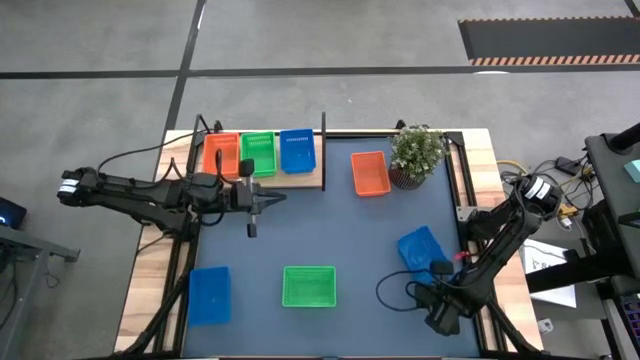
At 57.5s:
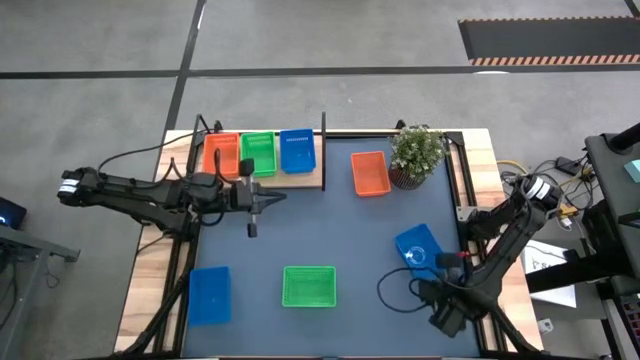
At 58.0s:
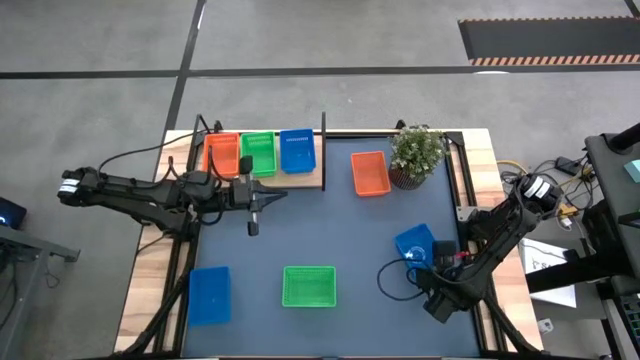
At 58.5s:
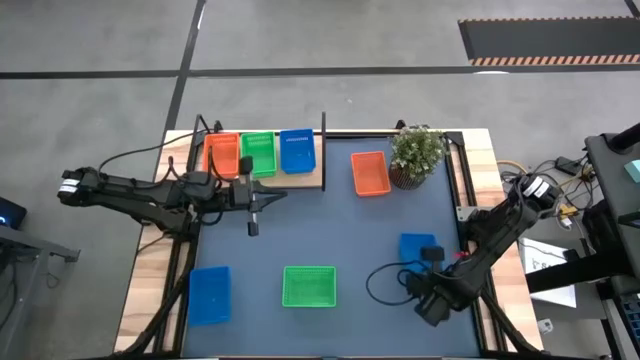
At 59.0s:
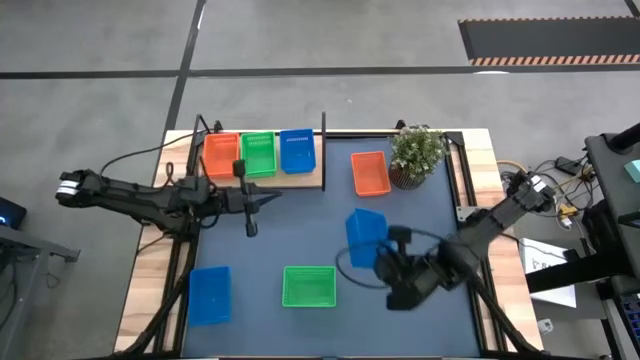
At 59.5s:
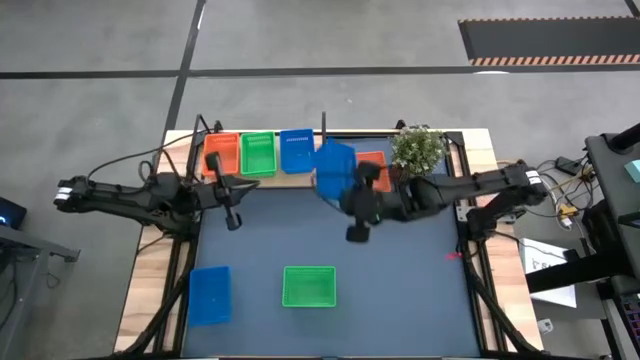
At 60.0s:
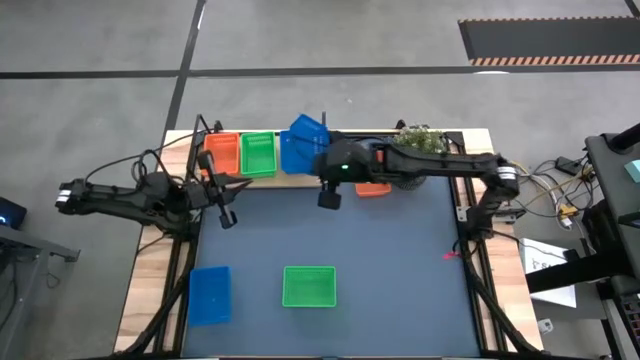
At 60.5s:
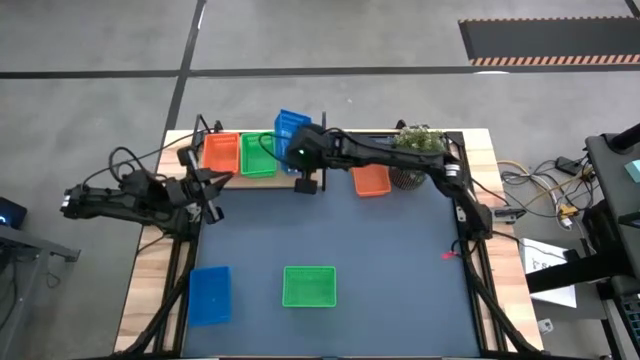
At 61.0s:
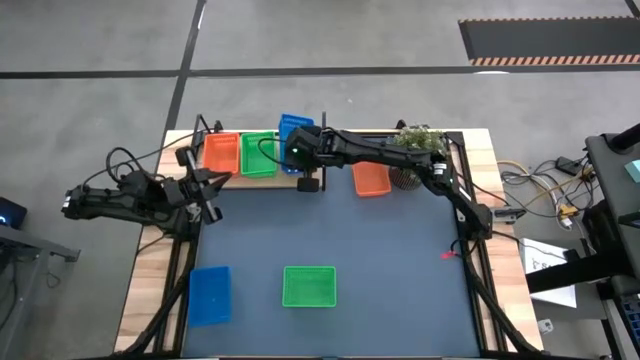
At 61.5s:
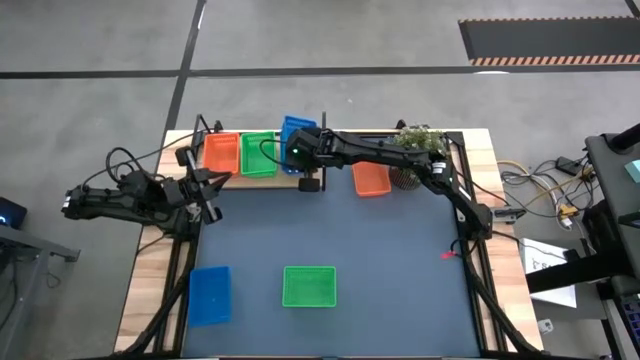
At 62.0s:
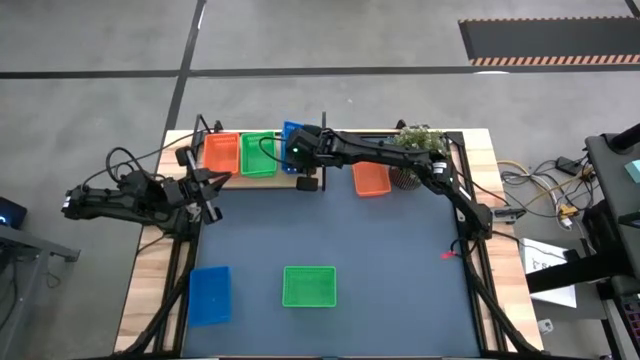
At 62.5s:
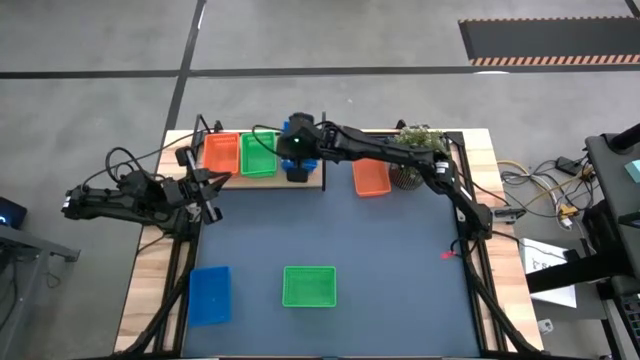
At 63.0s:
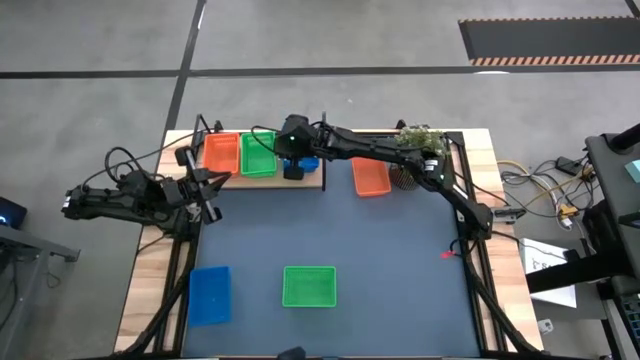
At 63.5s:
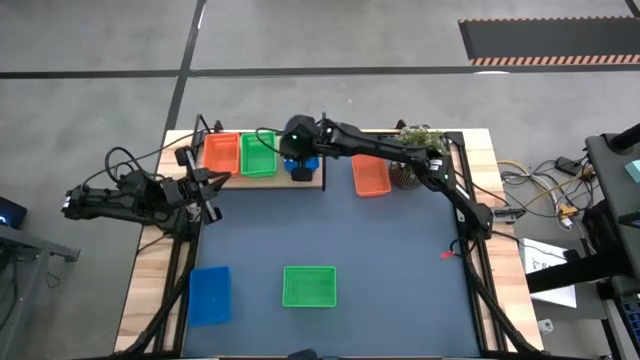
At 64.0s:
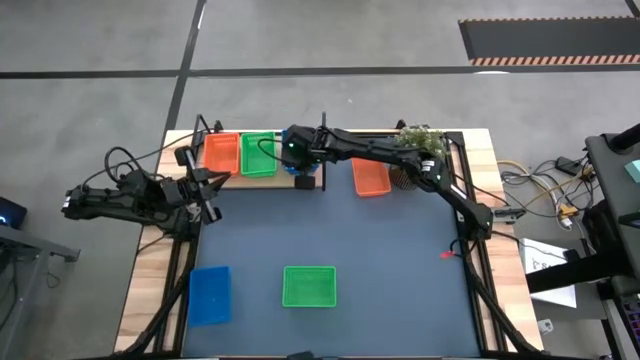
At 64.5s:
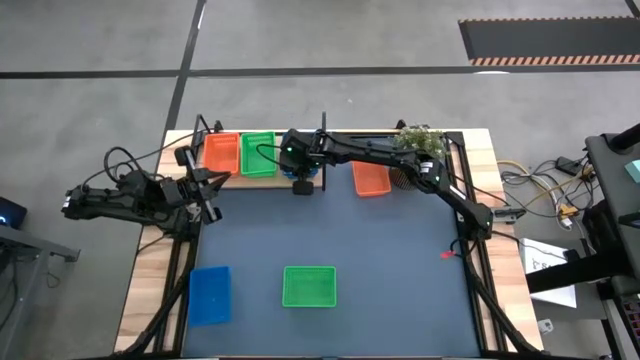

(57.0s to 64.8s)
Task: Stack baskets on shelf by color
Stack the right blue bin into the blue bin on the shelf

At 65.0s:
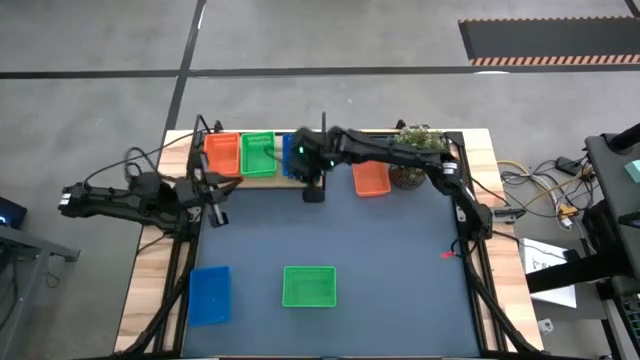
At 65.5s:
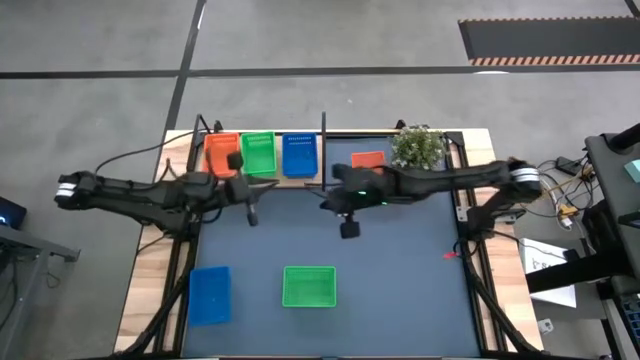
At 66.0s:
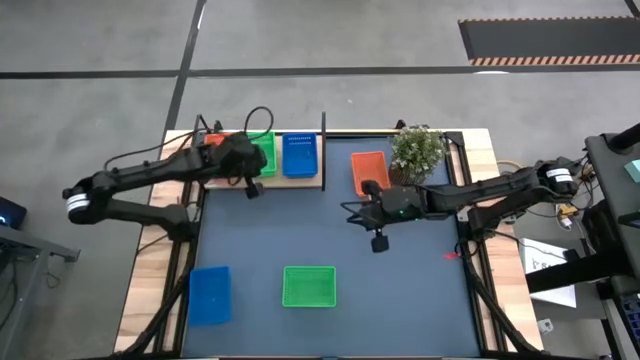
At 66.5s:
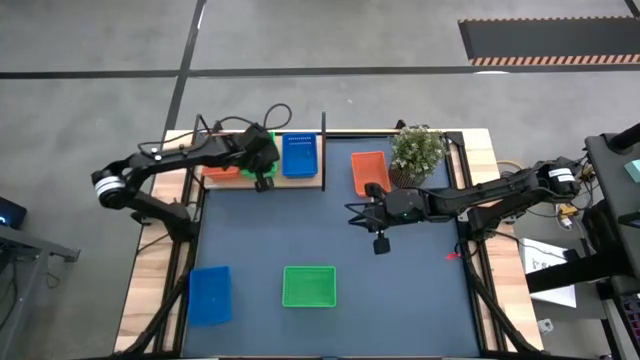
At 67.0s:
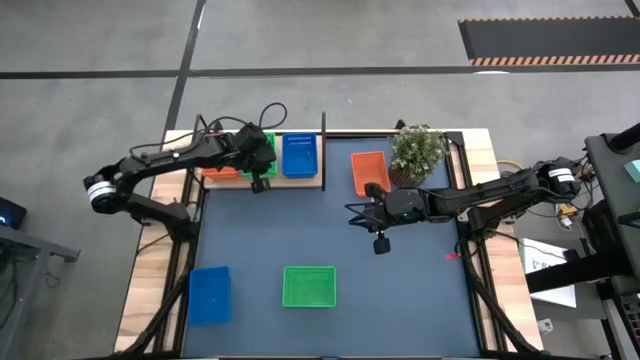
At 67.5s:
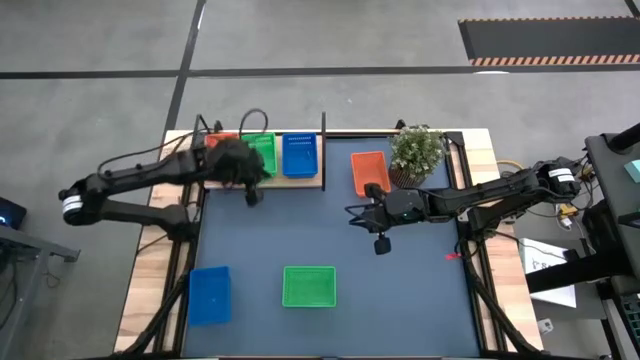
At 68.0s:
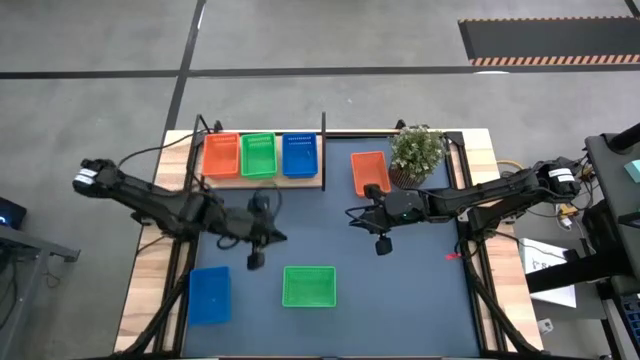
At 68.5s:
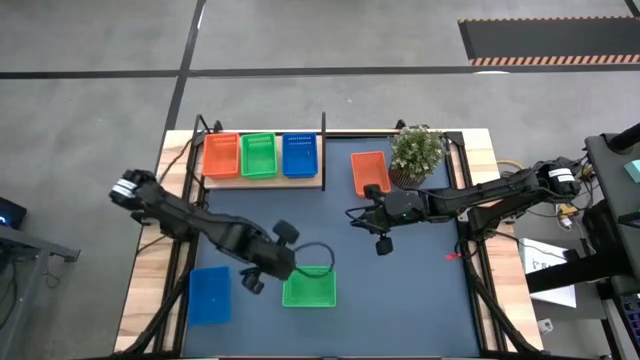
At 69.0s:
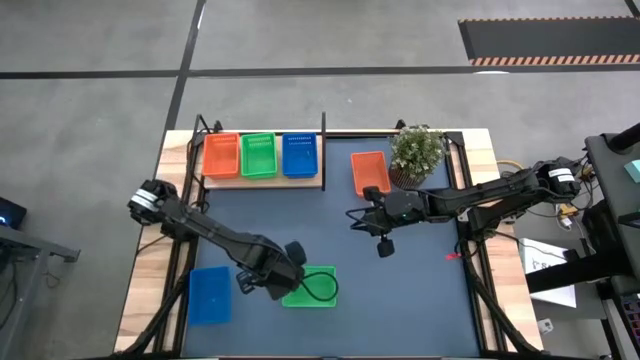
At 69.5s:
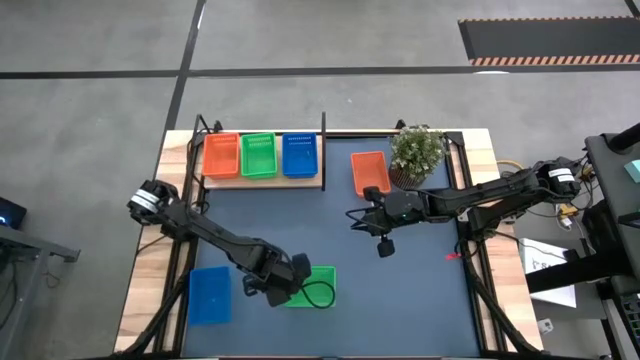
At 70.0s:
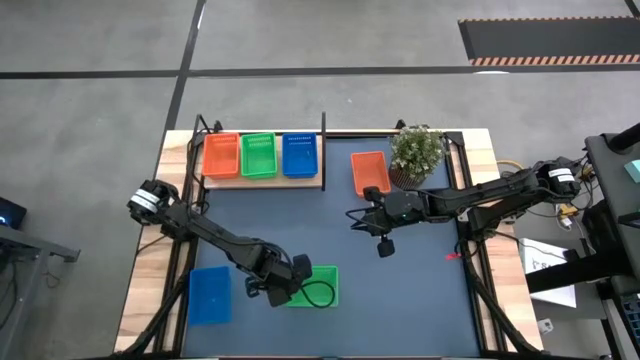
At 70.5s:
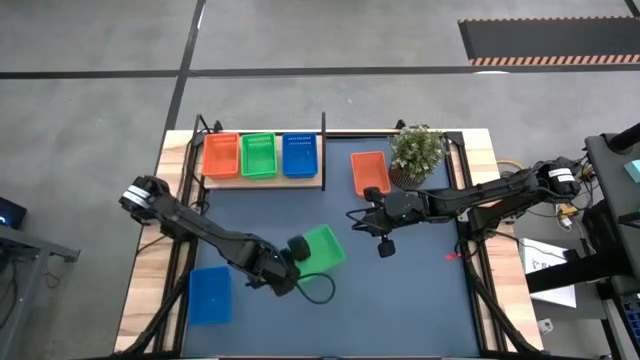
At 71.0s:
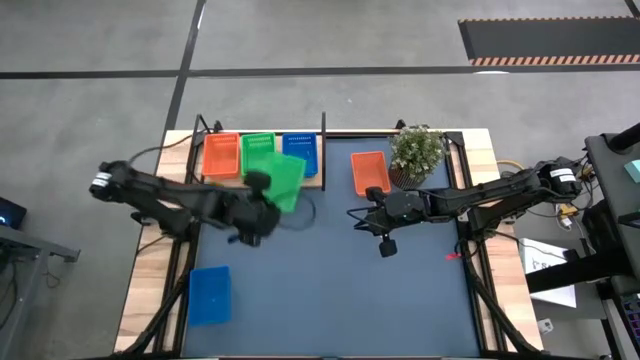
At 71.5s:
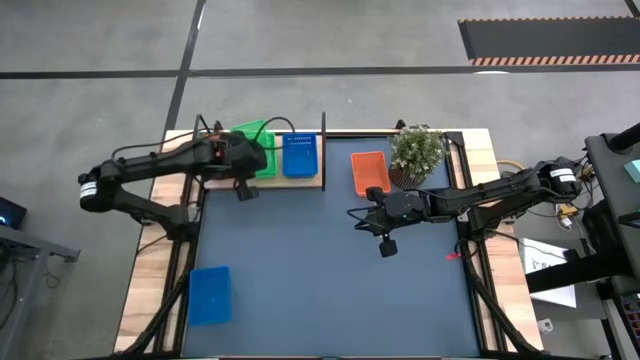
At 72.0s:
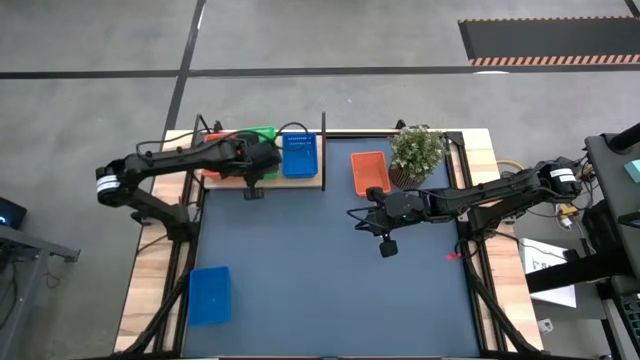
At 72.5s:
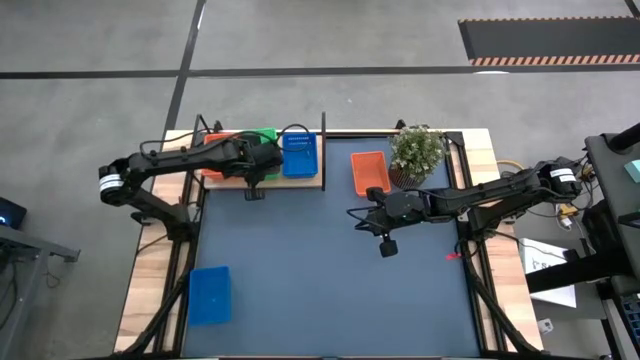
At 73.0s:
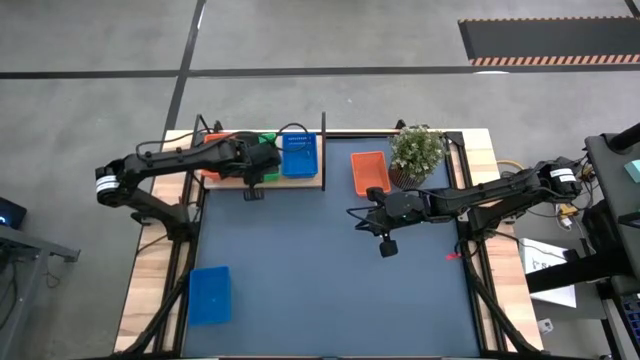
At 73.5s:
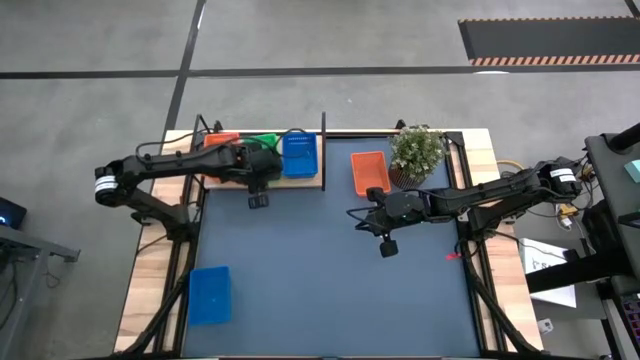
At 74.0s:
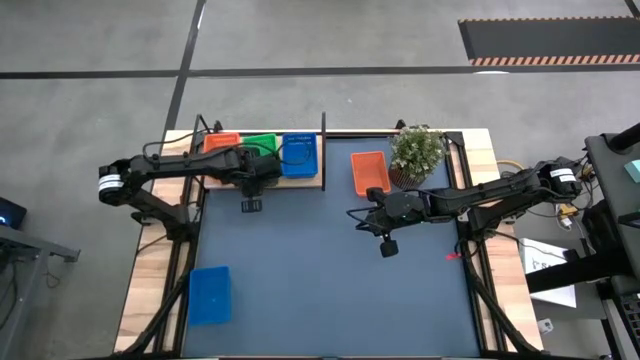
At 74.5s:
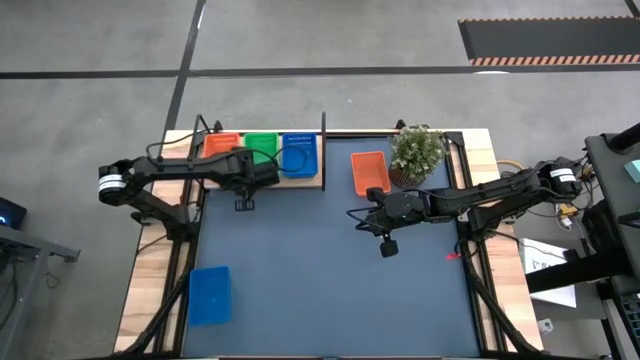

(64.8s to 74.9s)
Stack the green bin on top of the stacked green bins on the shelf

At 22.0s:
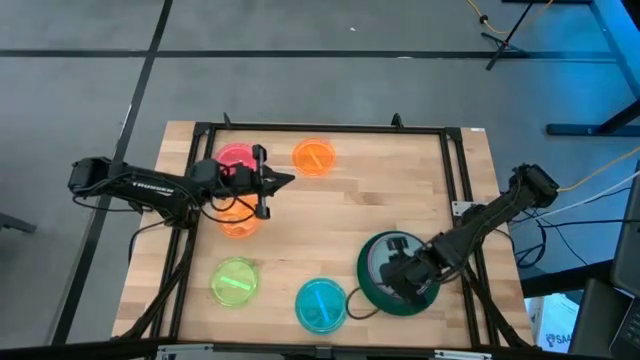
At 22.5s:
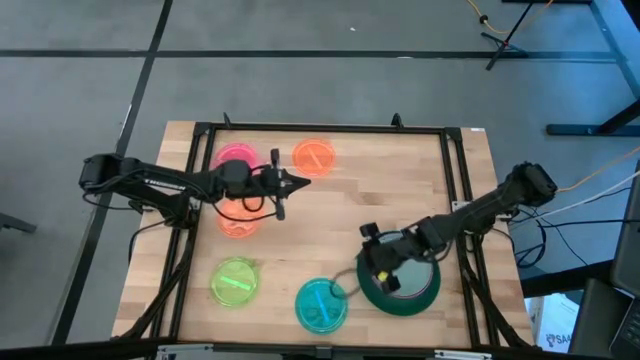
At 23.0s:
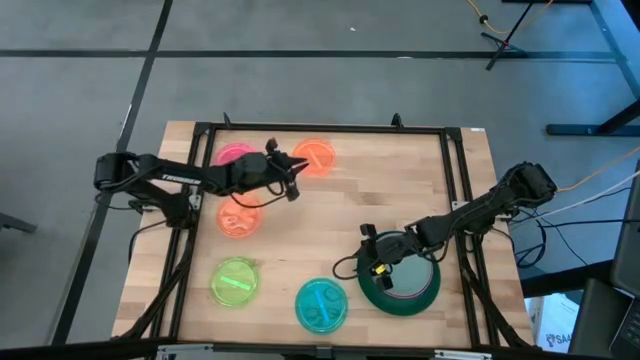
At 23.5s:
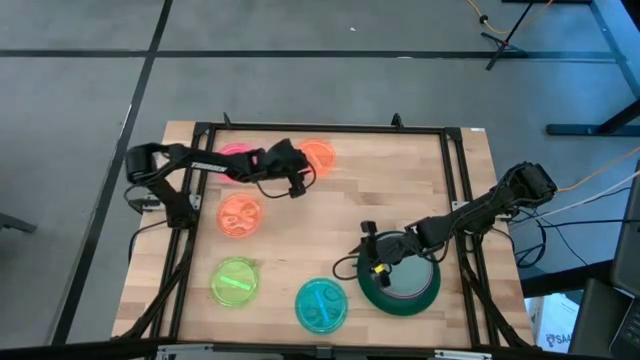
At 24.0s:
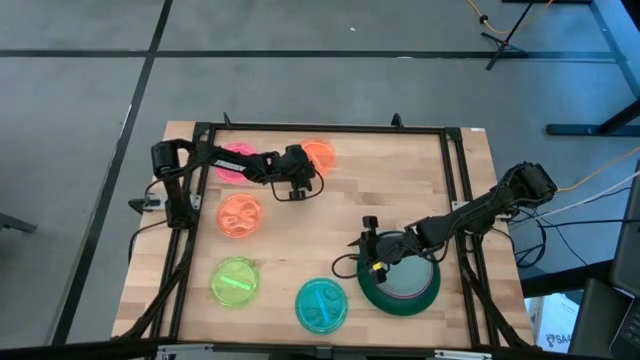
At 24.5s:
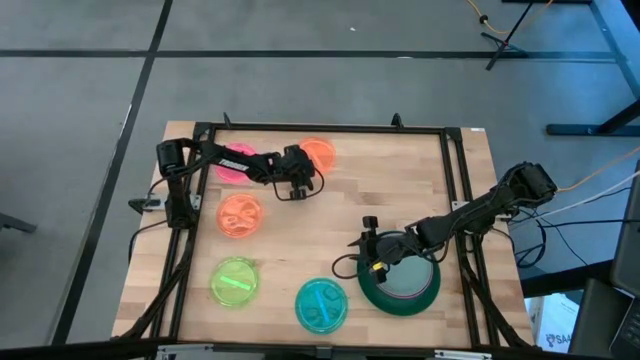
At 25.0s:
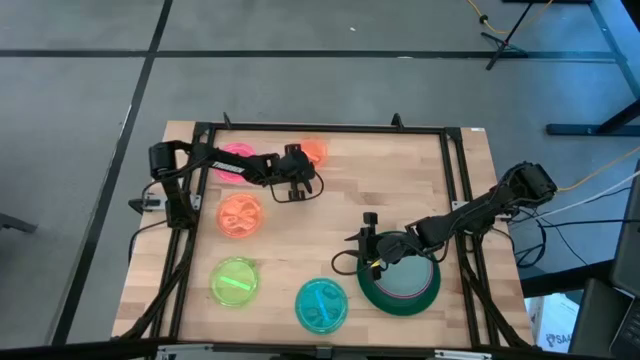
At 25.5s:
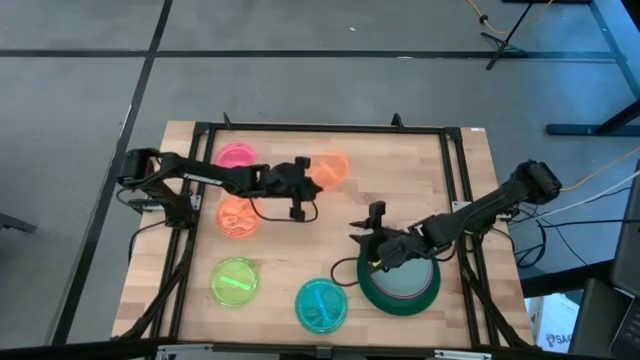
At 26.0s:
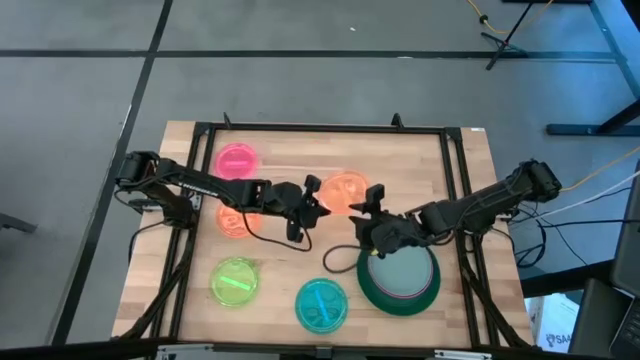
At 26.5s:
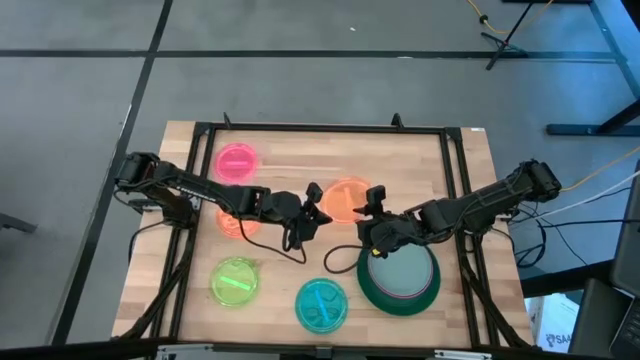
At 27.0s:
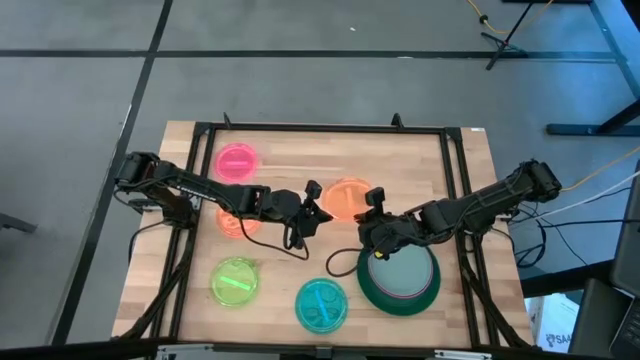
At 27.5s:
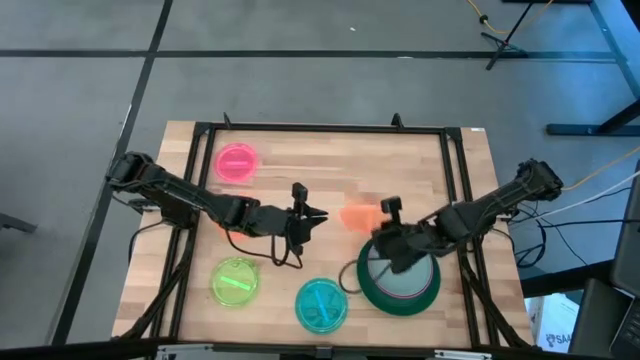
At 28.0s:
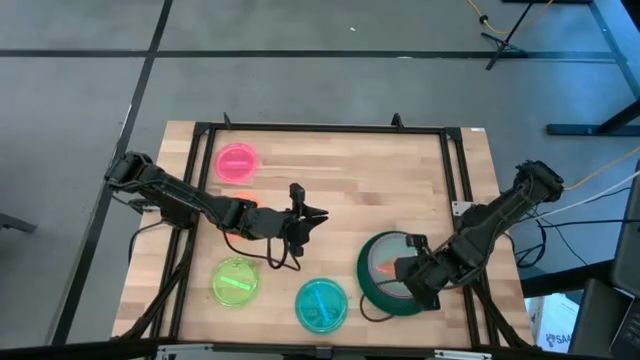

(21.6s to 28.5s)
Task: Stack plastic plates
Stack the orange plate on the gray plate
